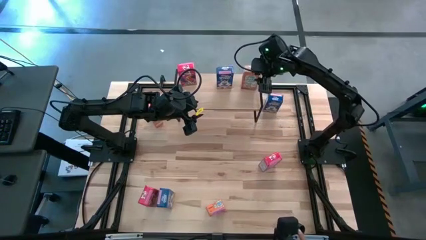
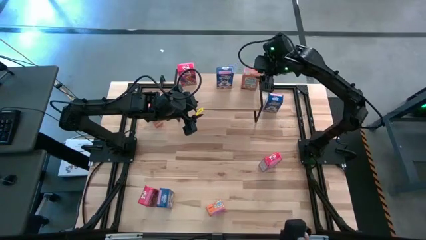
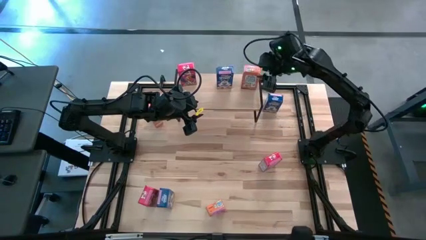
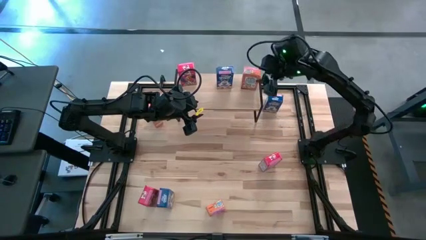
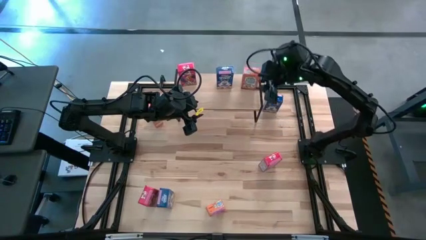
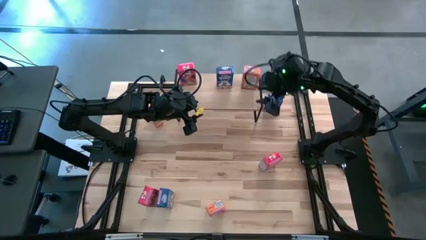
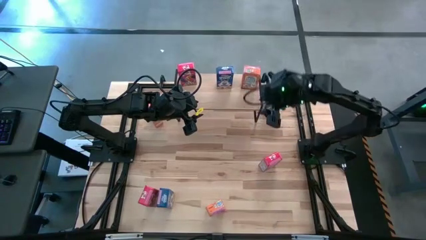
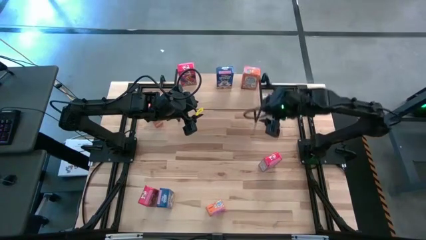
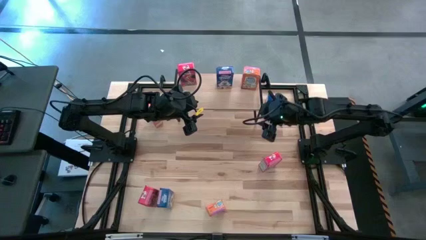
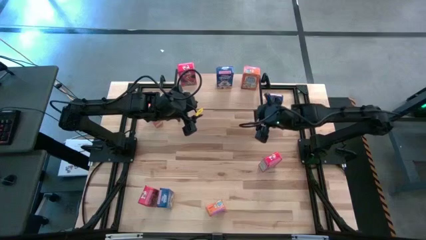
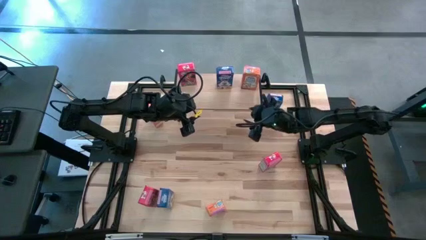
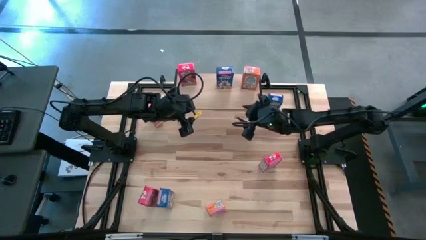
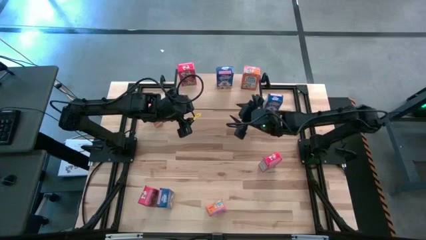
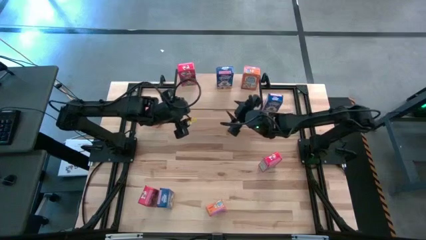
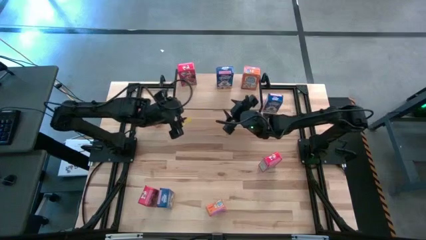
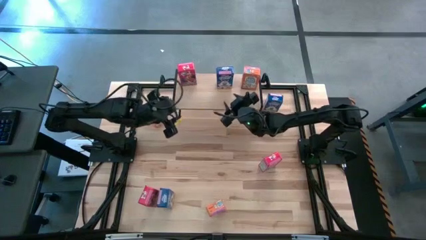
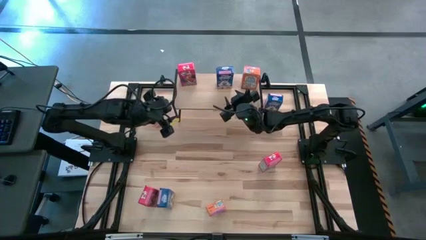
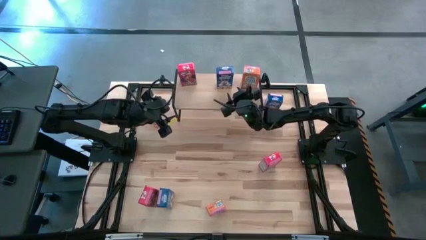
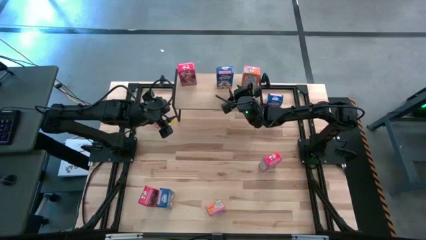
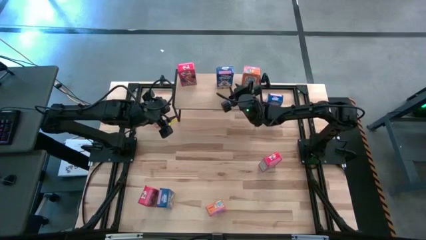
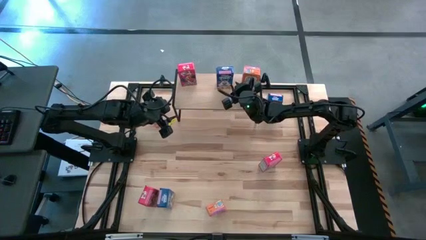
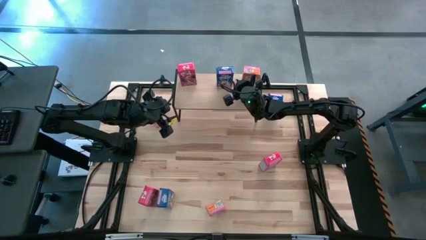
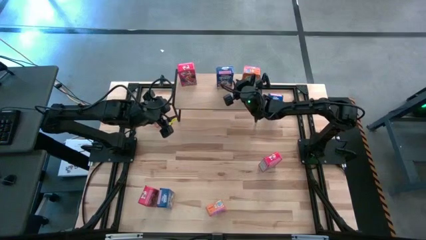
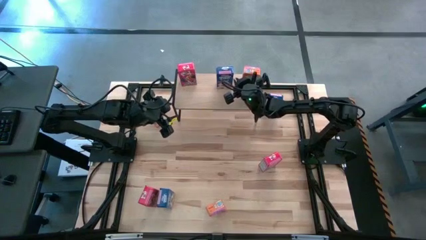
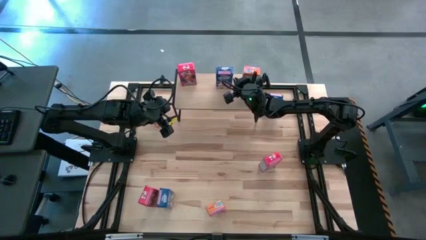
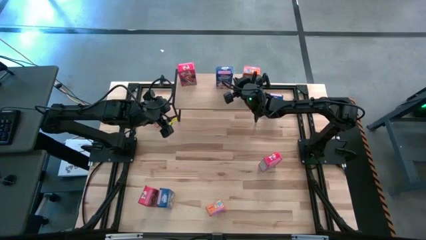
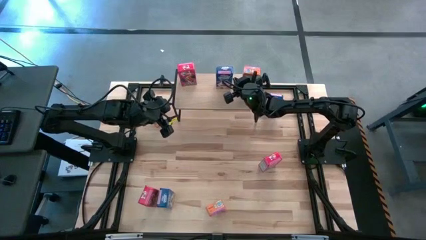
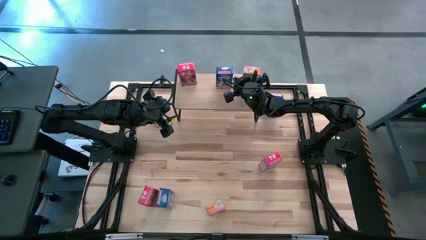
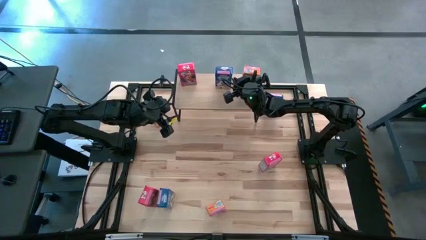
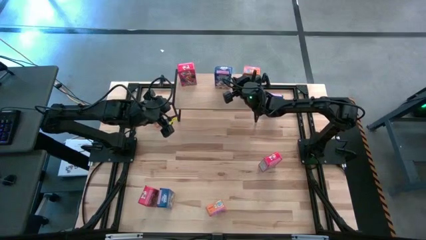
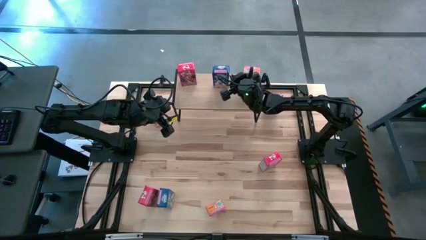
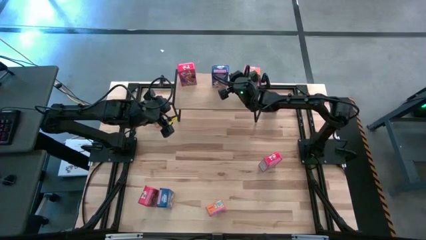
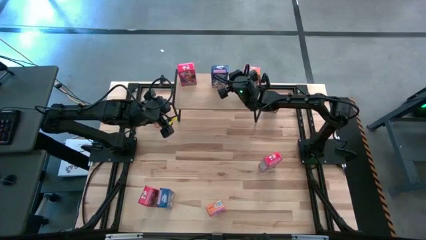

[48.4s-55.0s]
Task: Stack cereal on shelf
Adjust the blue cereal box on the shelf

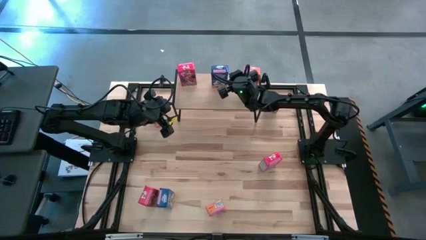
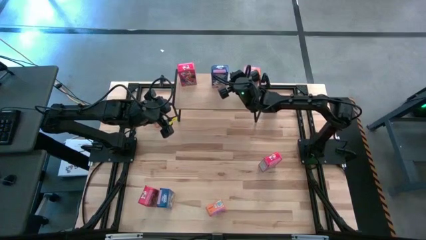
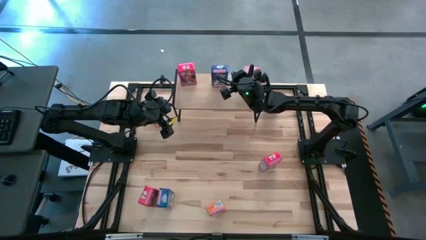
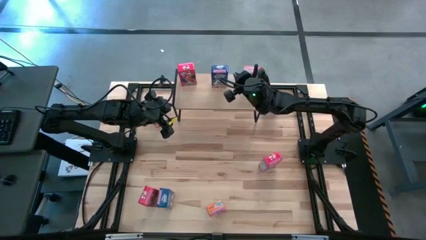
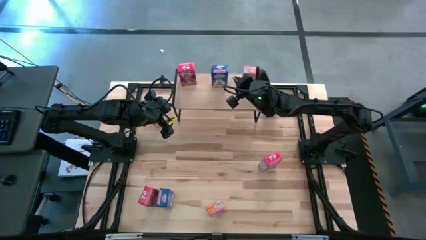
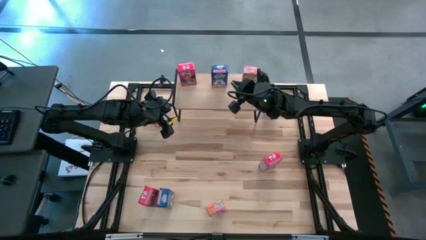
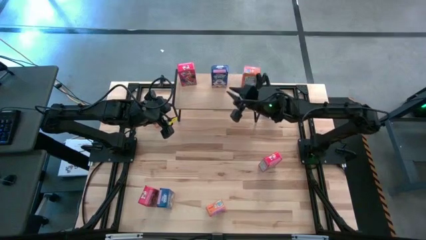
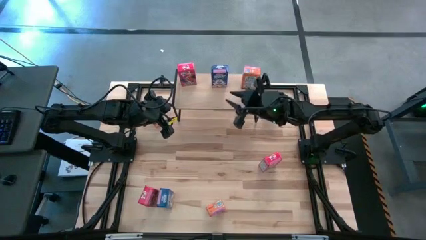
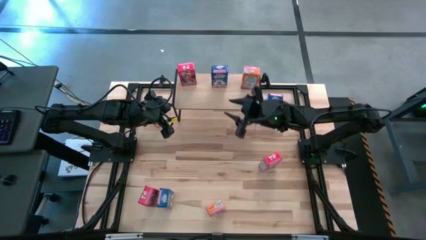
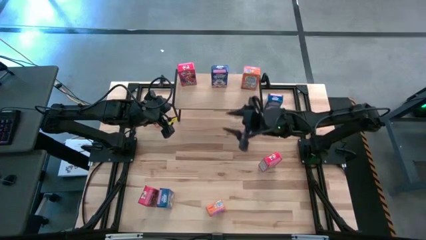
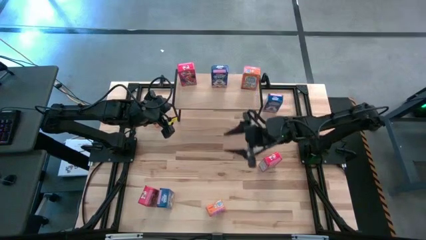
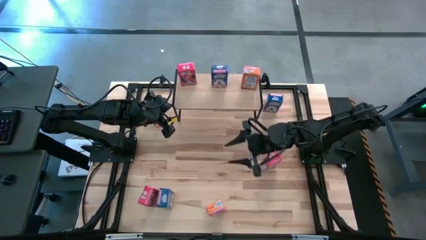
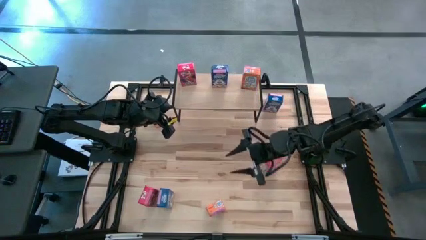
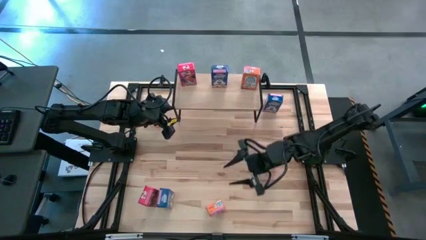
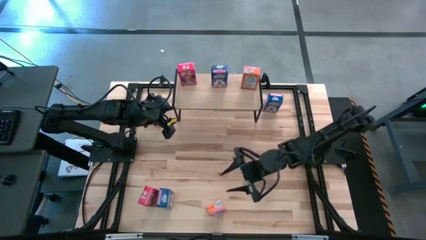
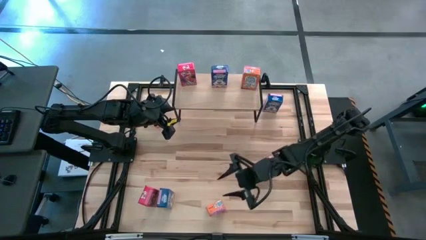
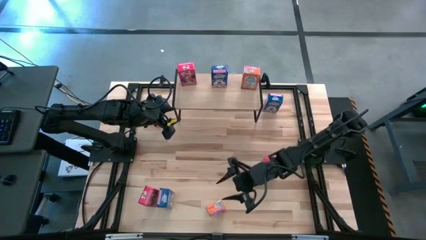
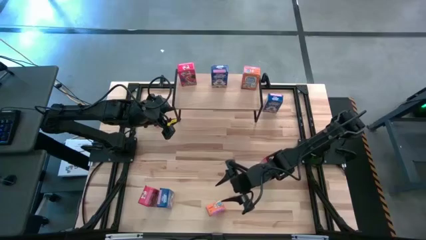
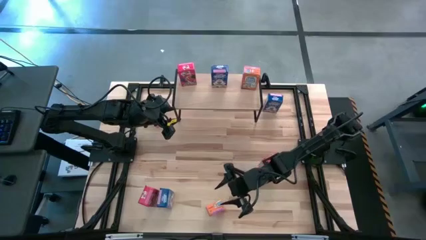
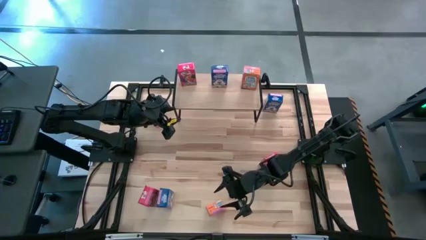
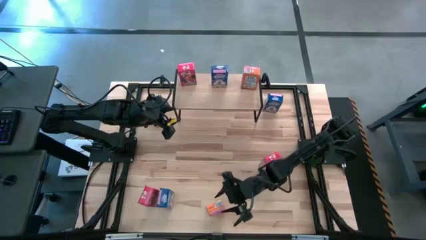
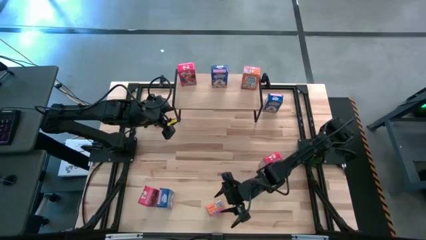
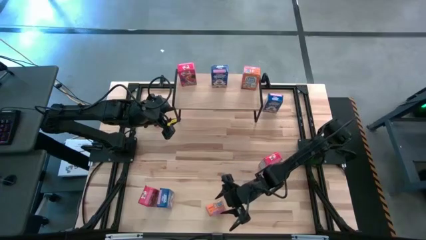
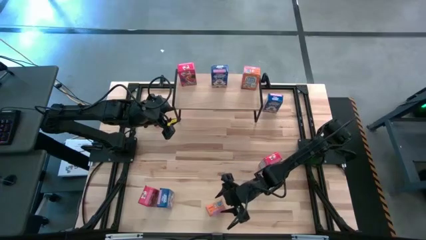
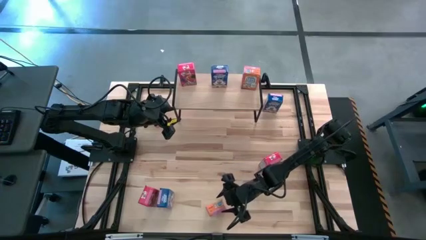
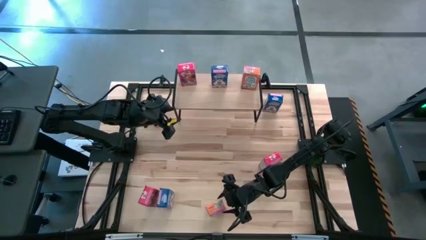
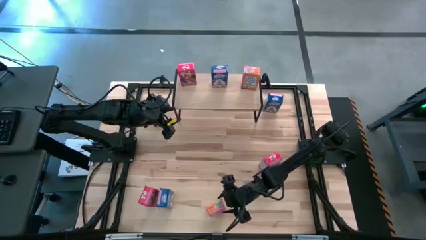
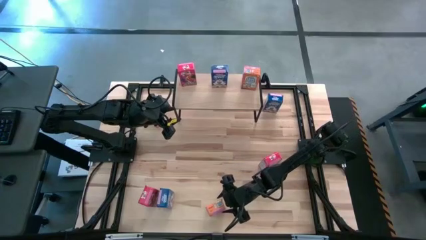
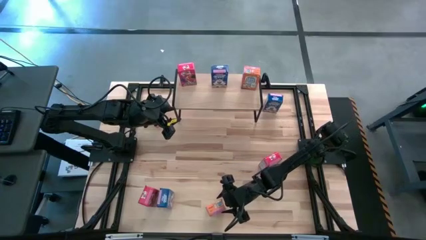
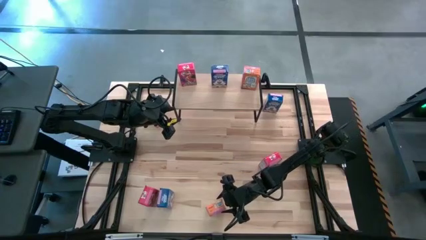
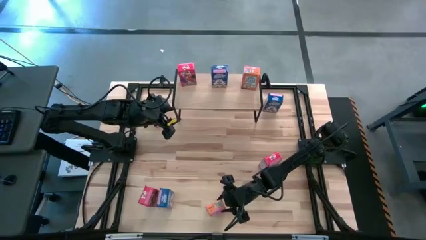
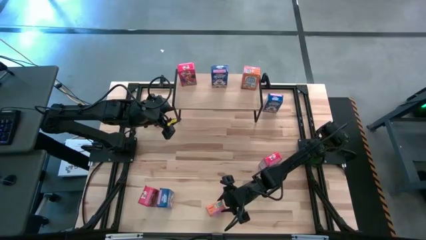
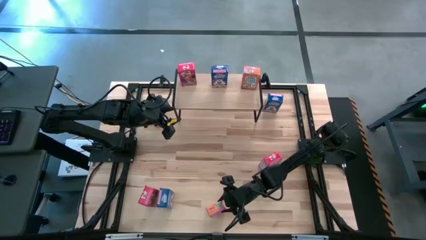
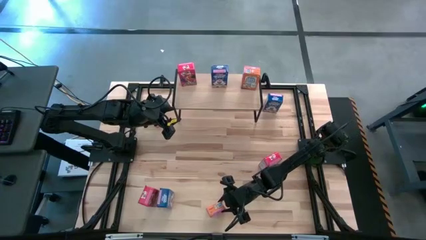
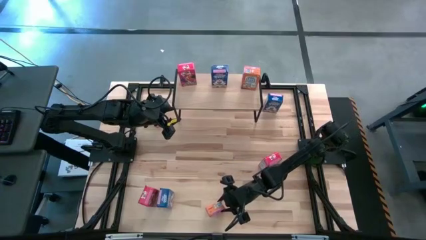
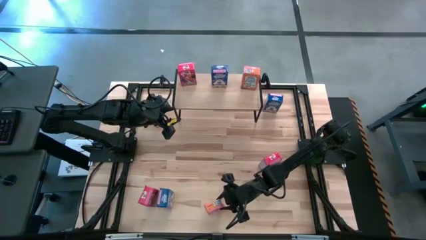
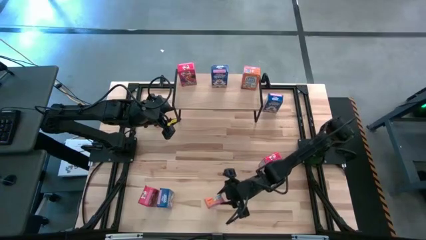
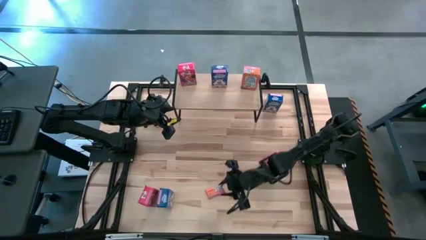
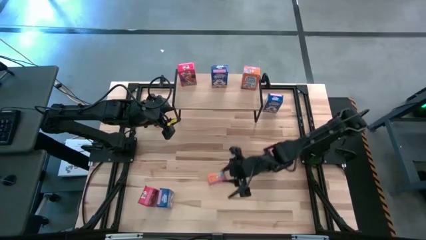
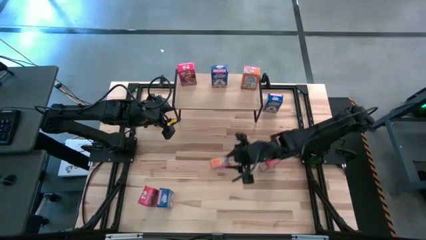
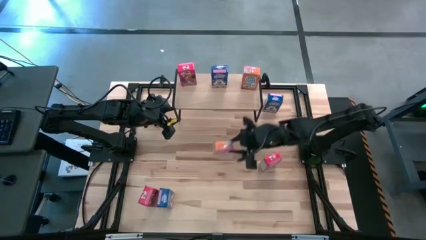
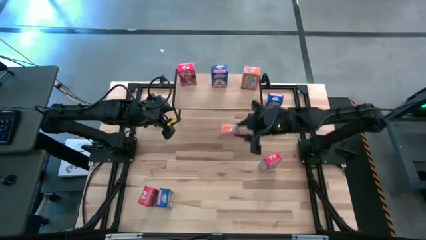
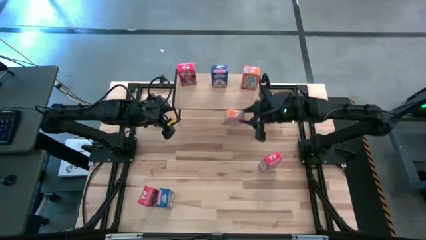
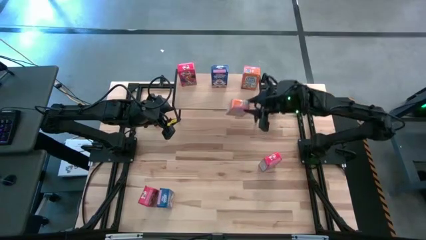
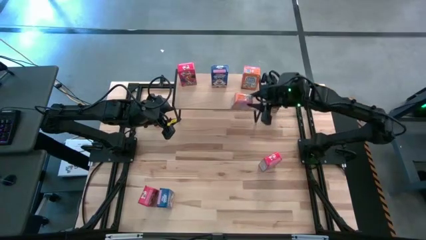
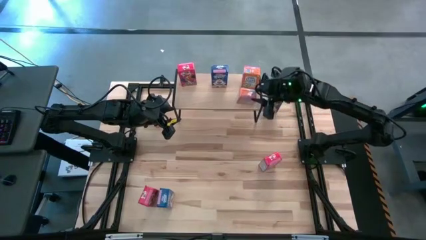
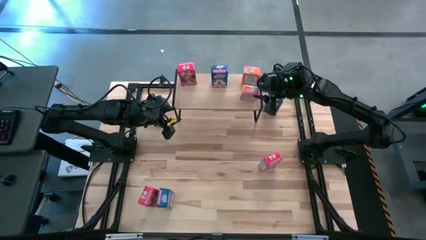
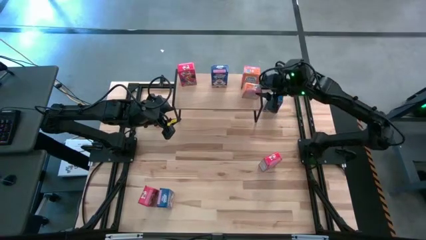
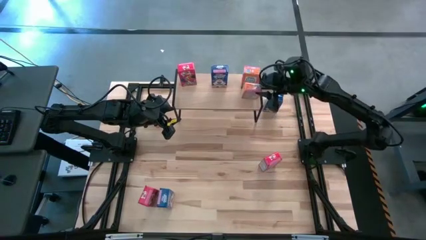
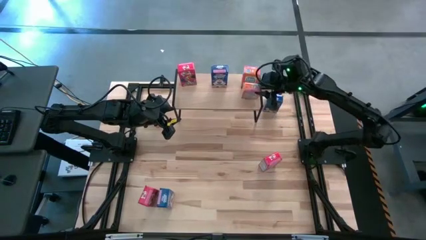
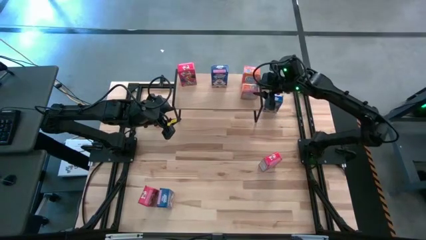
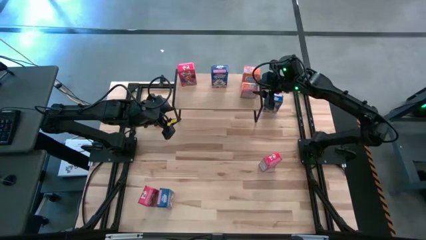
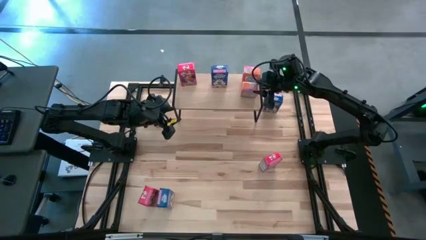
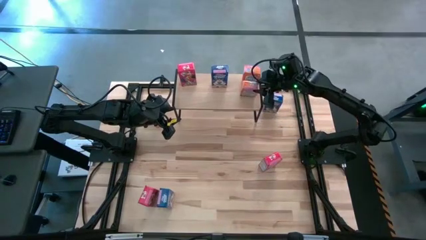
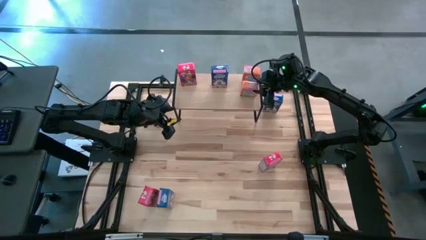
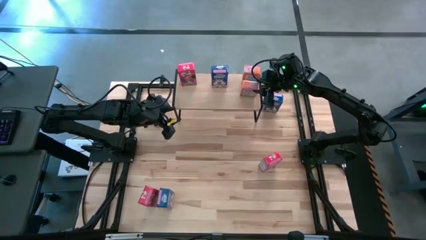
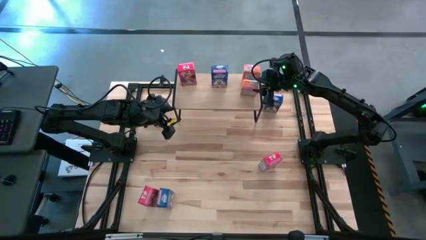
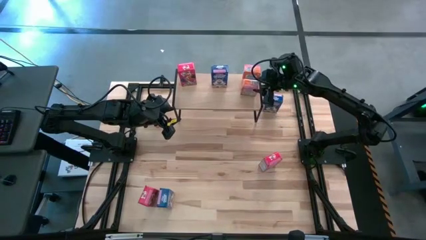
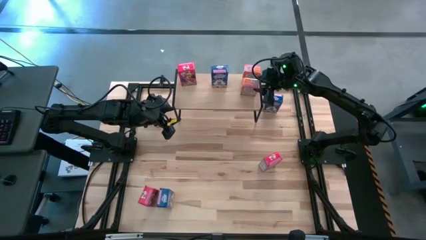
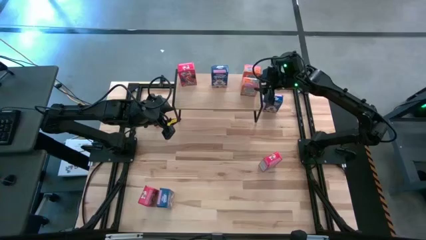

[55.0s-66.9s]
Put the bottom orange cereal box on the shelf
